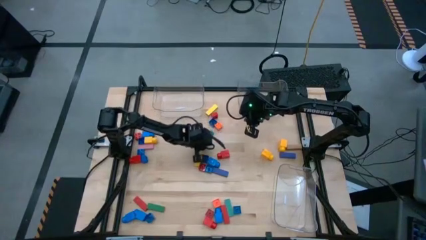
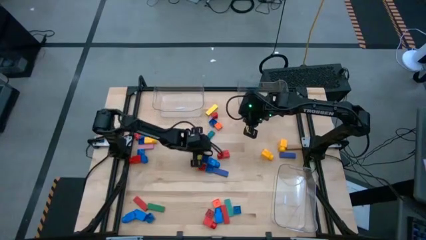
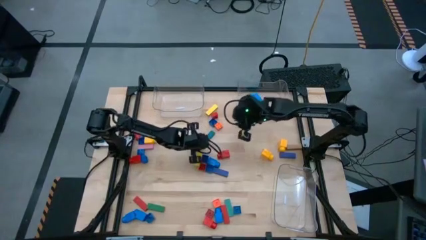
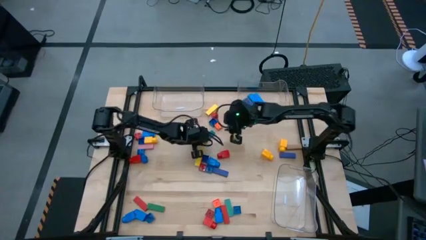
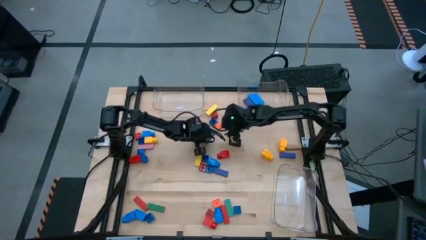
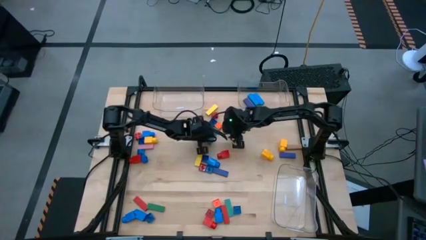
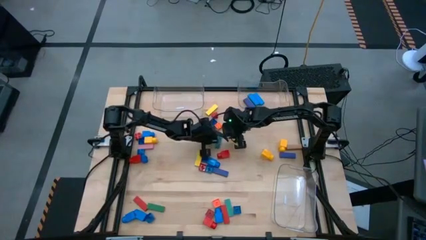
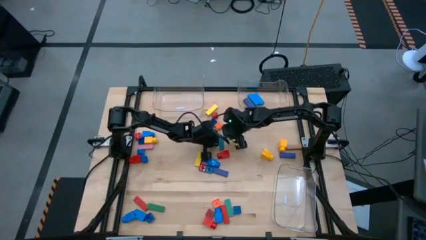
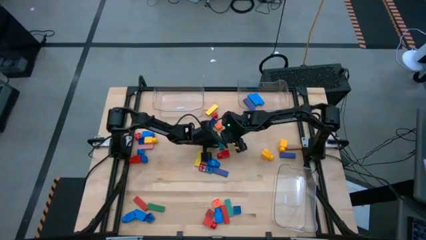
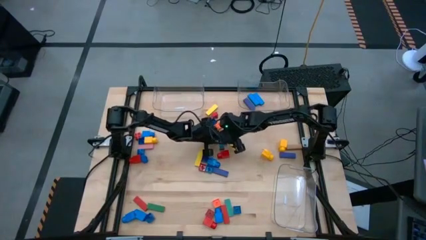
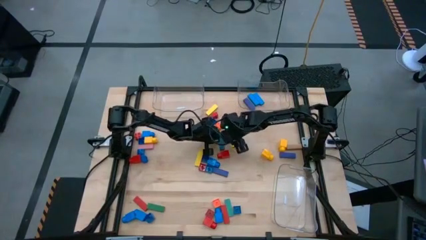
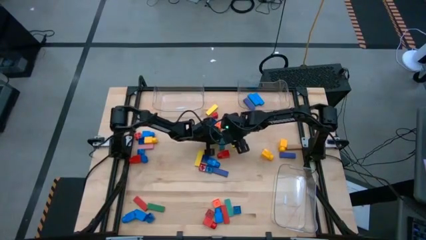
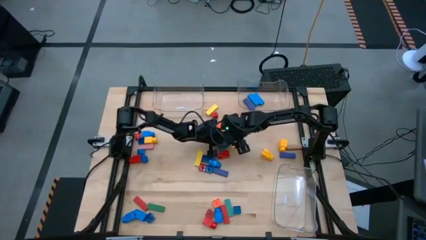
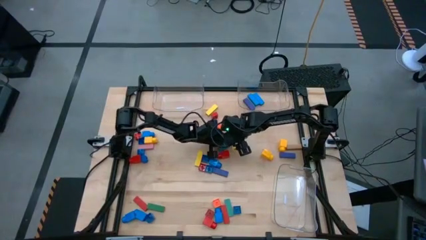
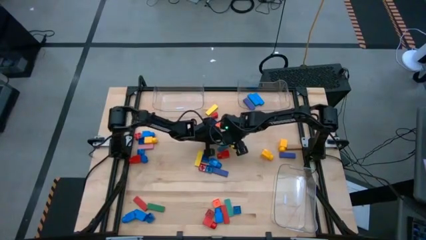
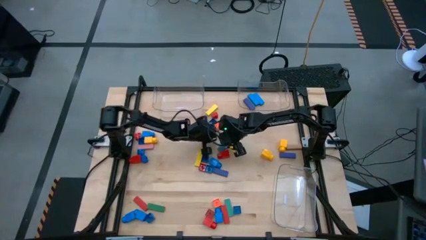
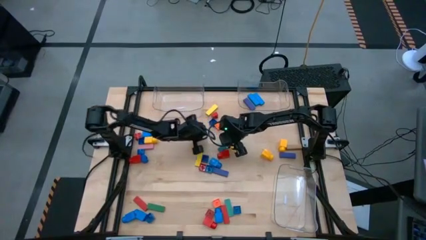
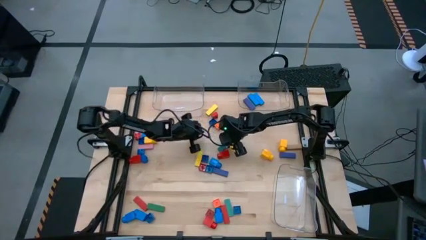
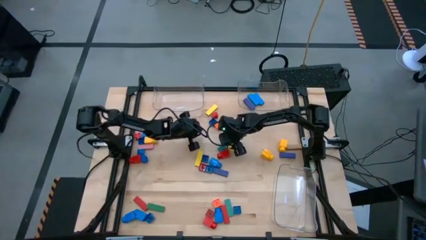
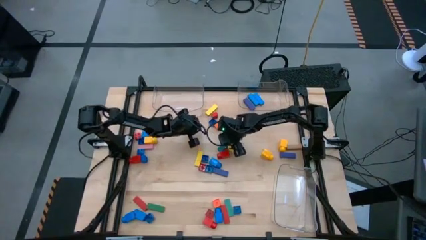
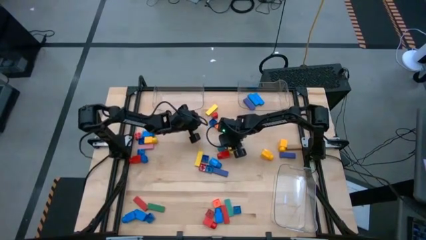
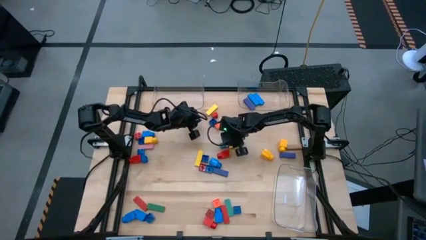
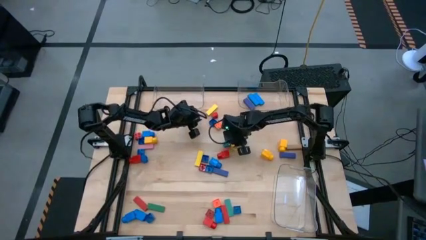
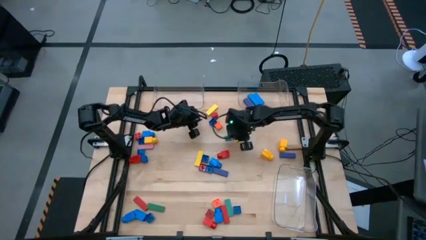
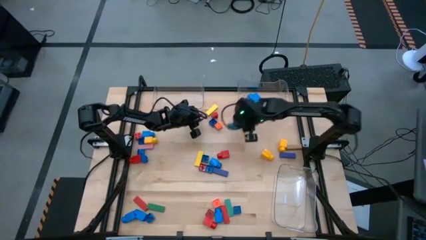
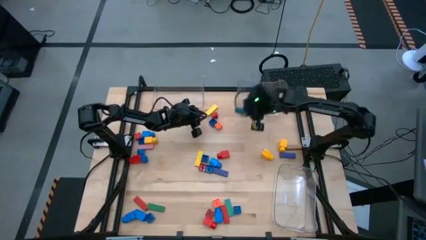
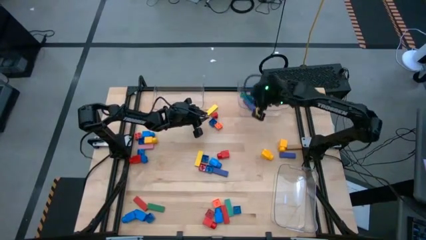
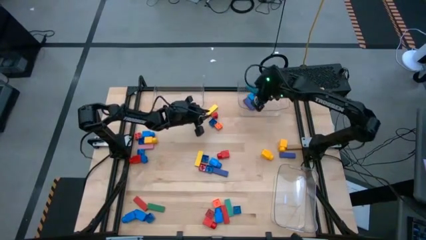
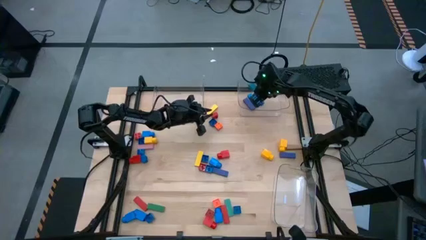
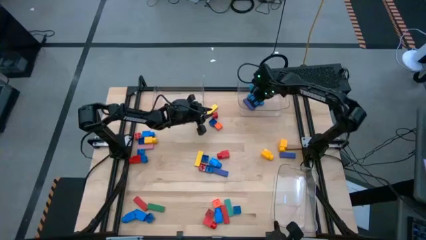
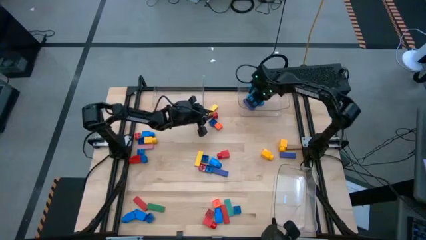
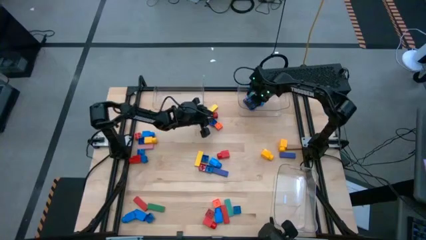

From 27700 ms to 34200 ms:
Task: Sort blocks by size
Put the light blue block into the top right transparent bin

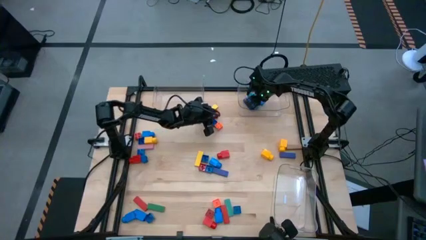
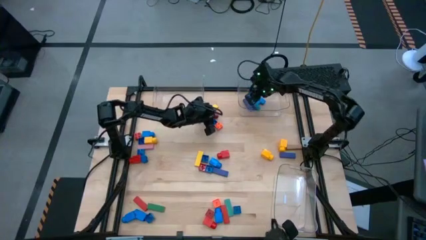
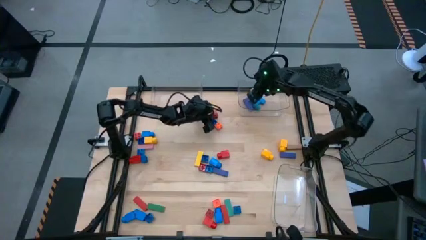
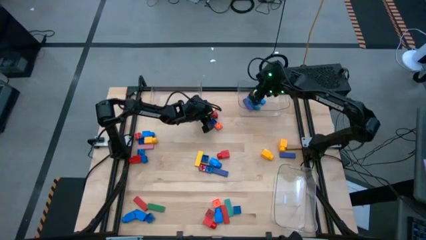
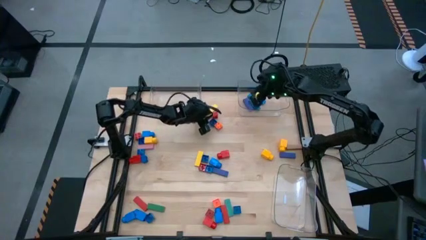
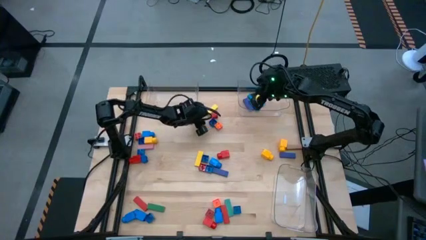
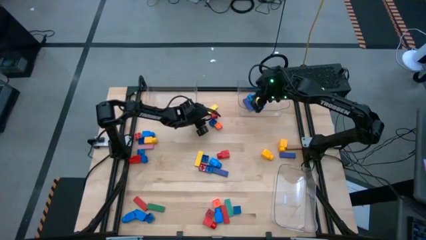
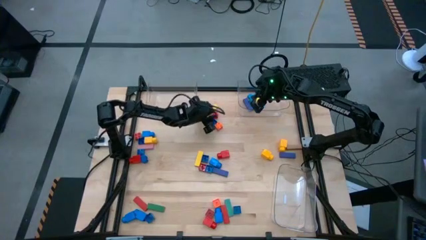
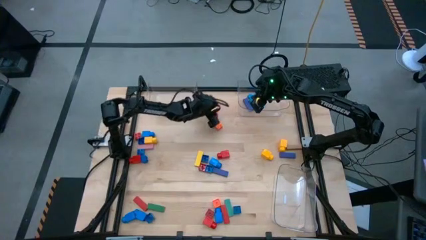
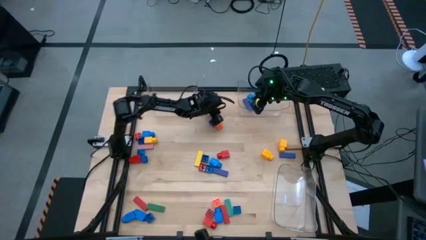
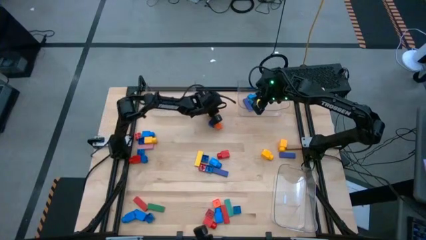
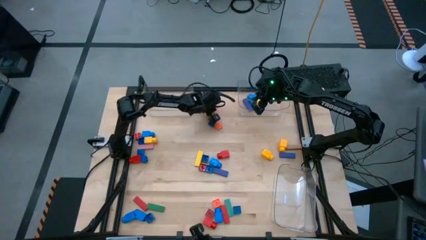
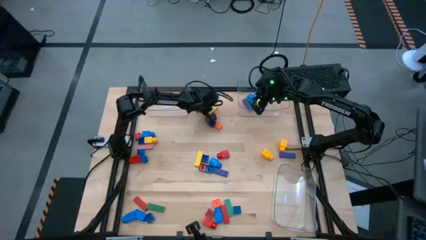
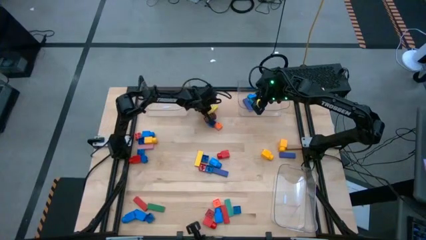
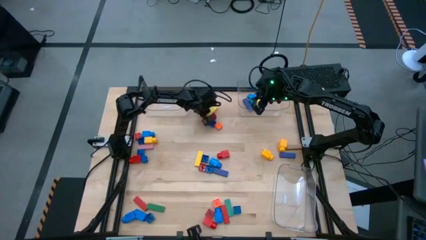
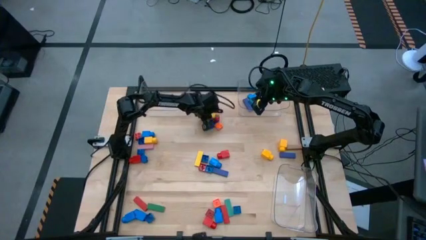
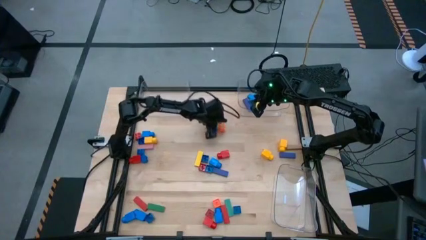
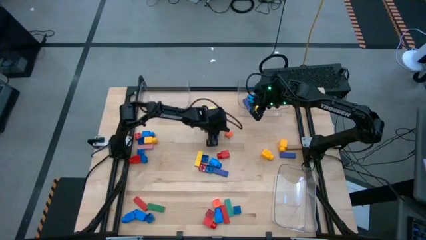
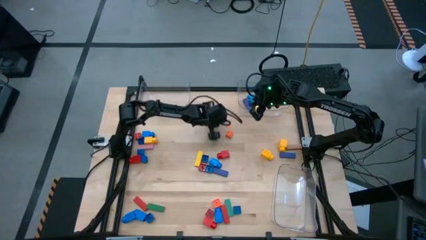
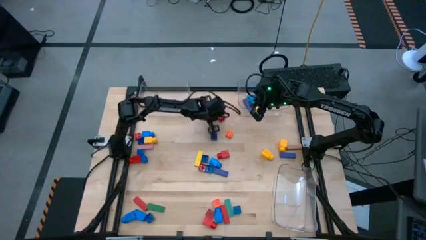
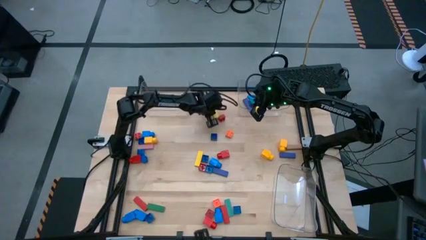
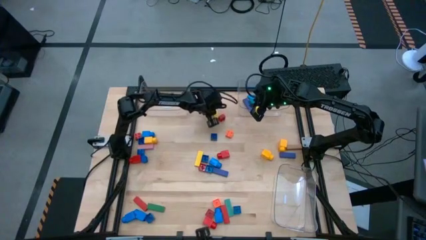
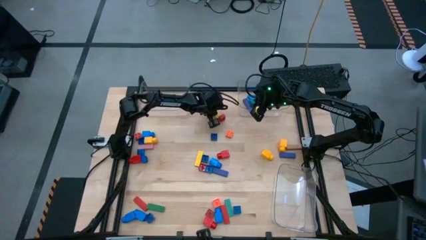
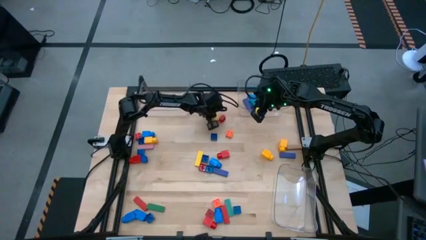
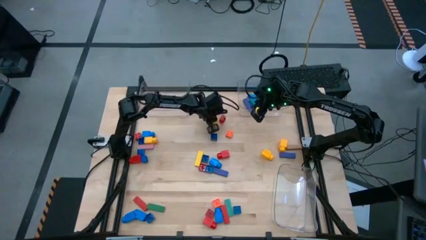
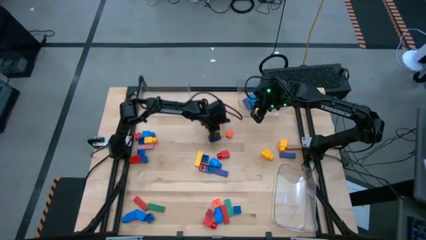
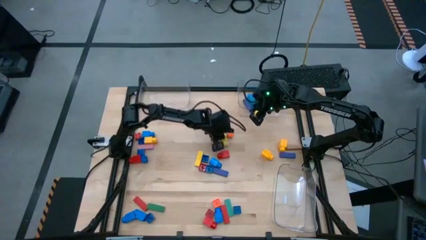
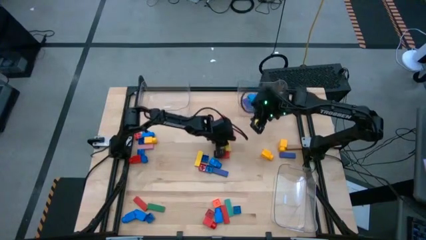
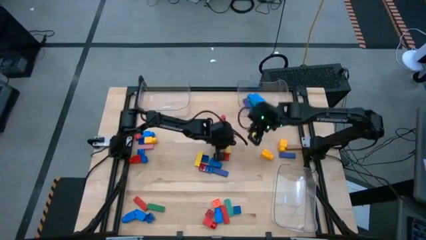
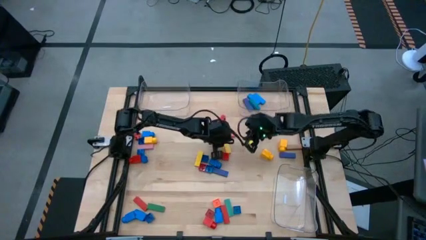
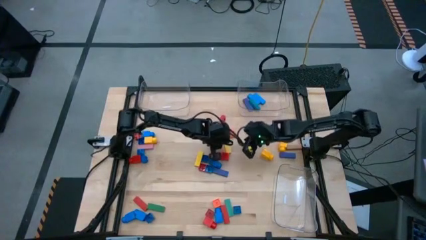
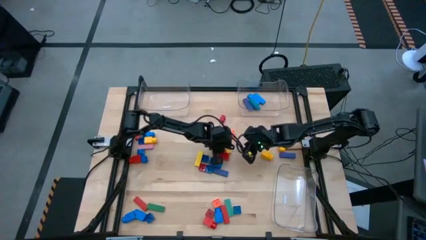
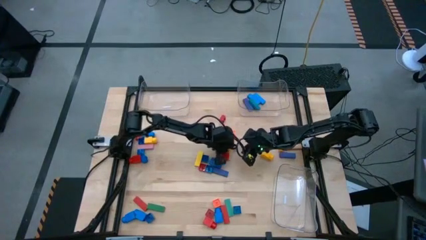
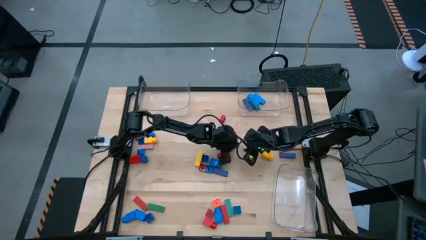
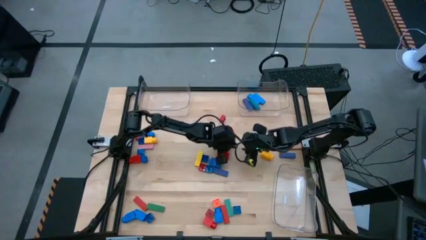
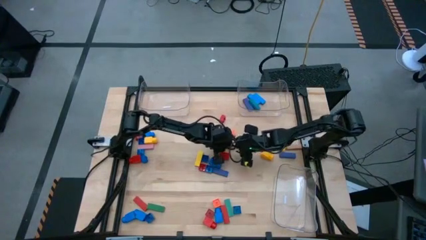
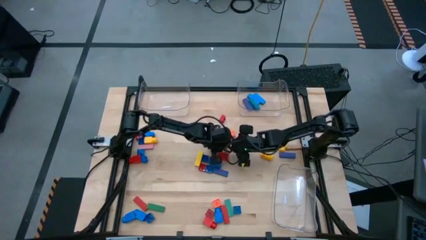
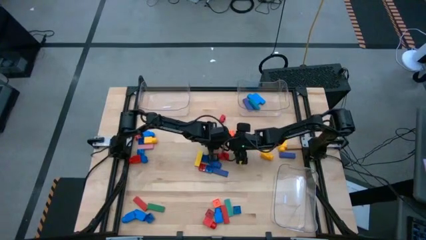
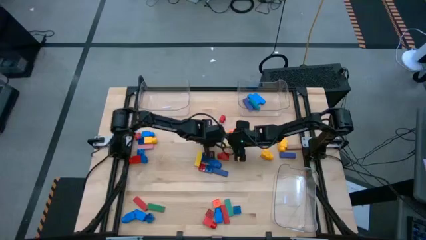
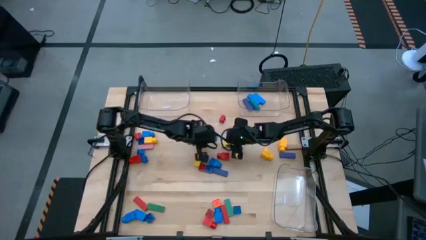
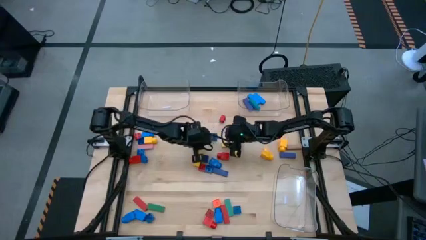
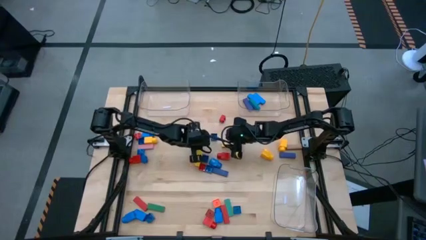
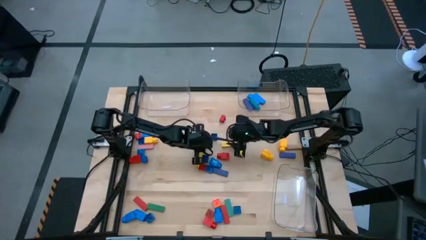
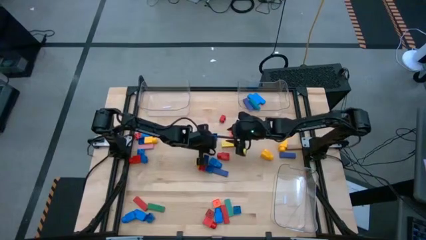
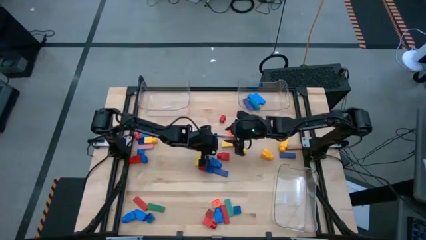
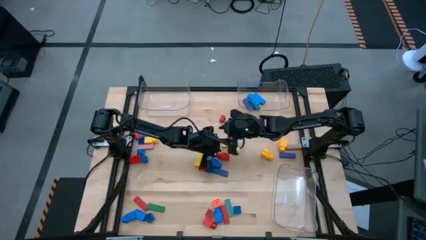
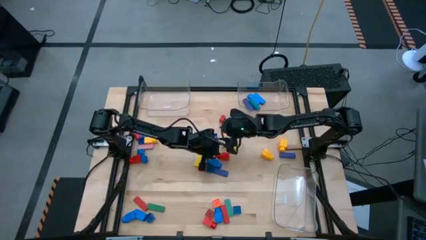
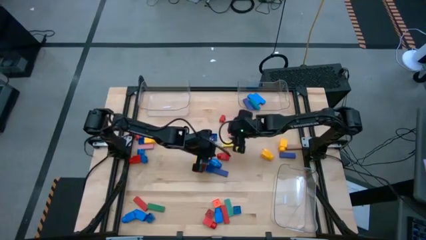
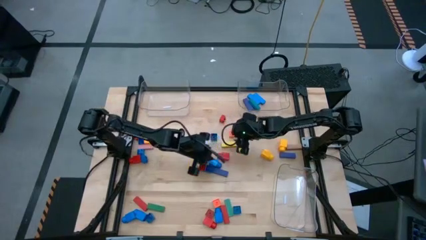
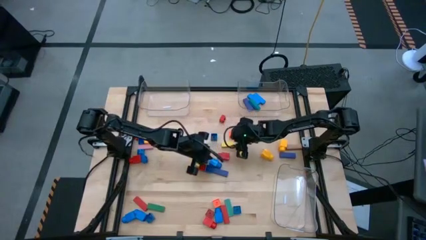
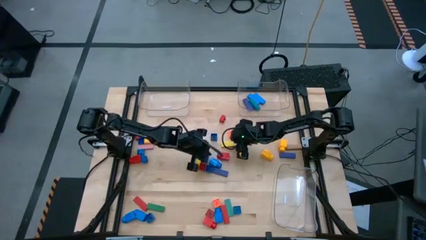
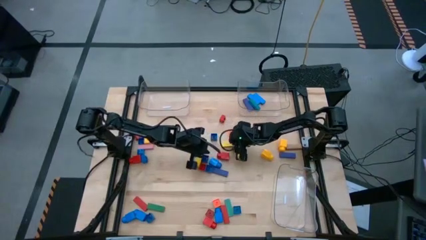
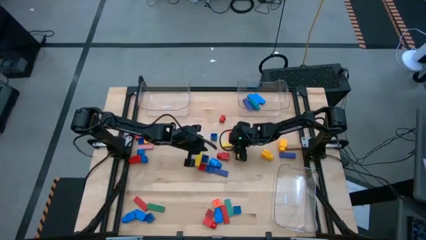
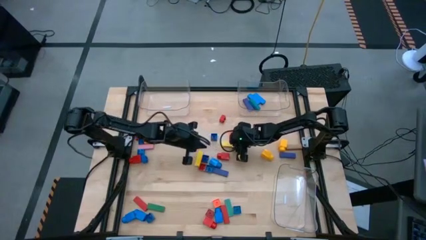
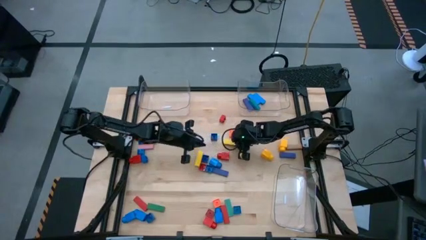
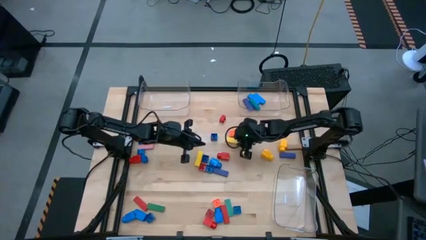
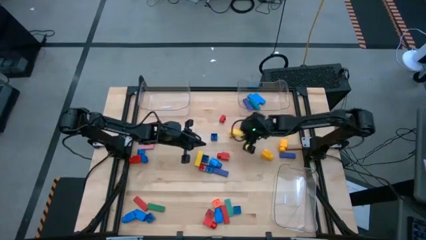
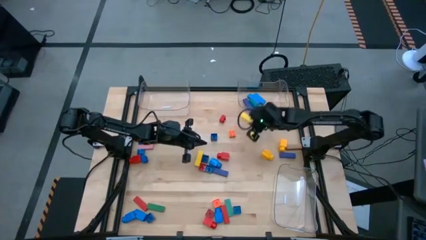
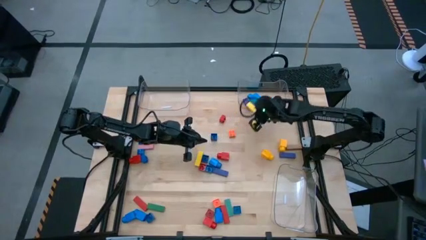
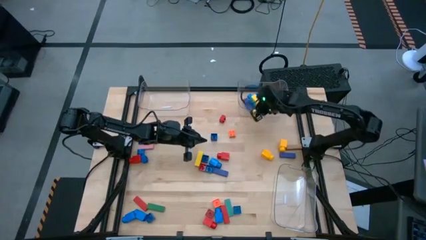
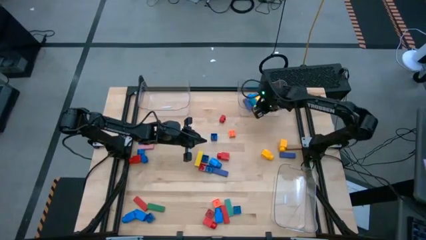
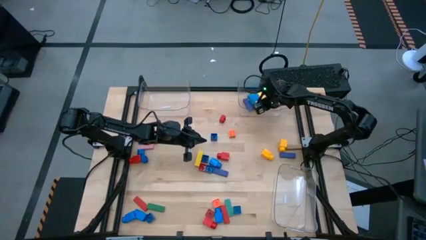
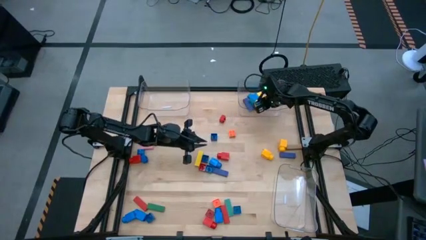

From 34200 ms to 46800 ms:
Put the yellow block into the top right transparent bin
